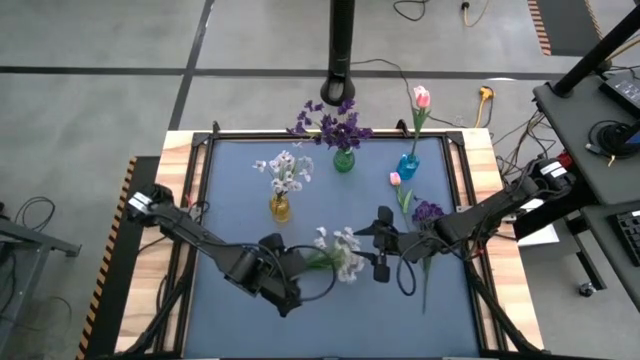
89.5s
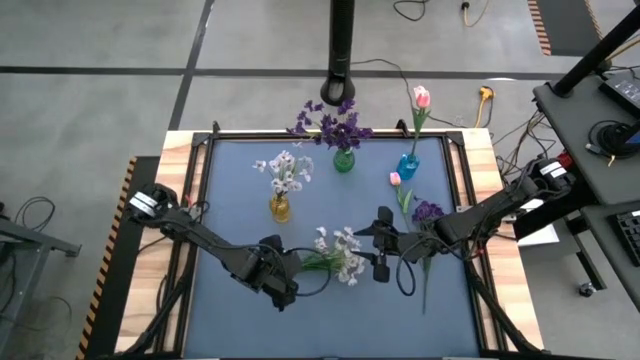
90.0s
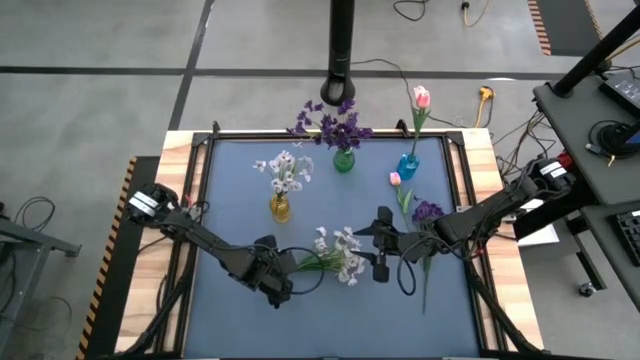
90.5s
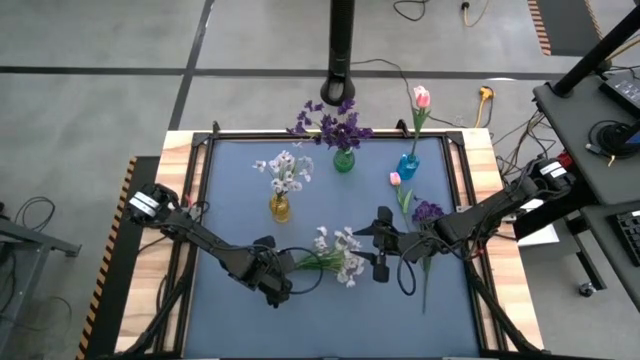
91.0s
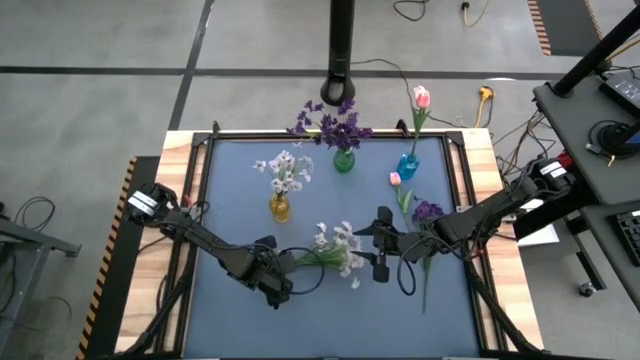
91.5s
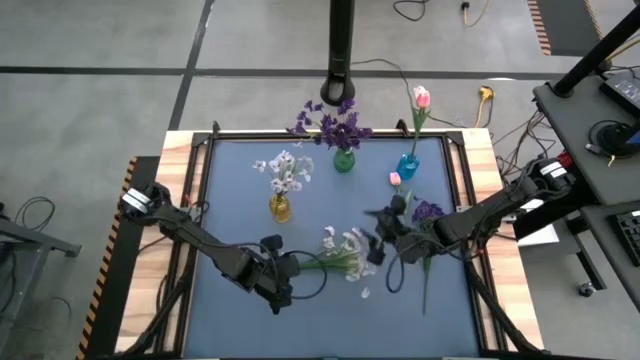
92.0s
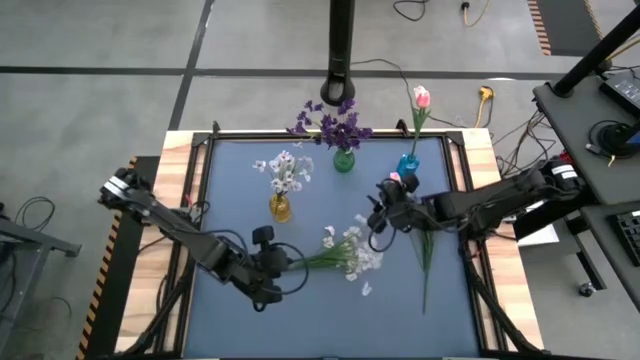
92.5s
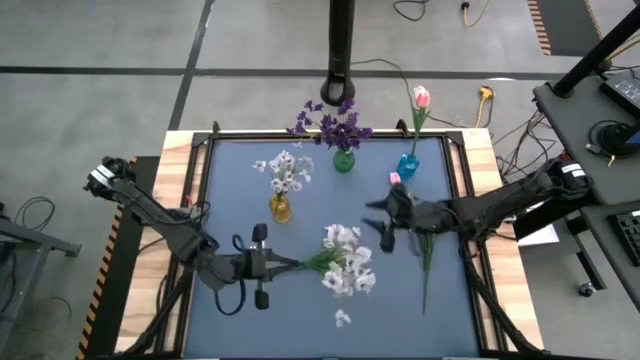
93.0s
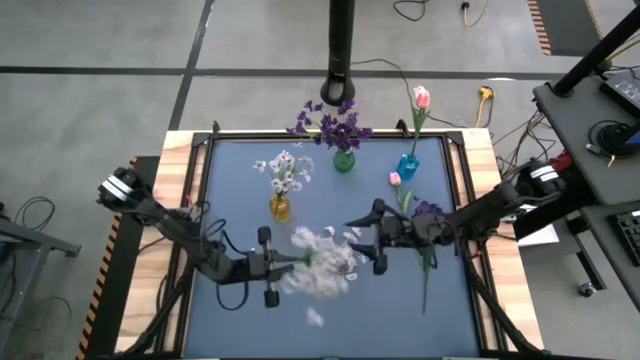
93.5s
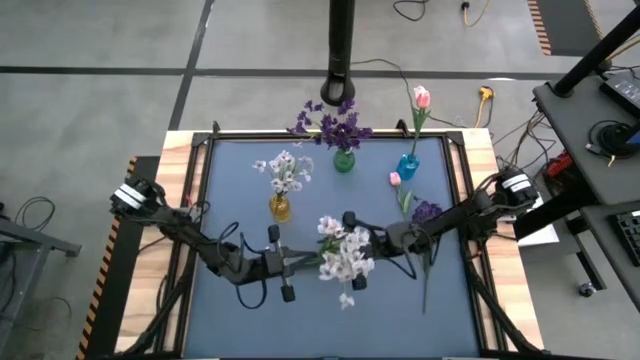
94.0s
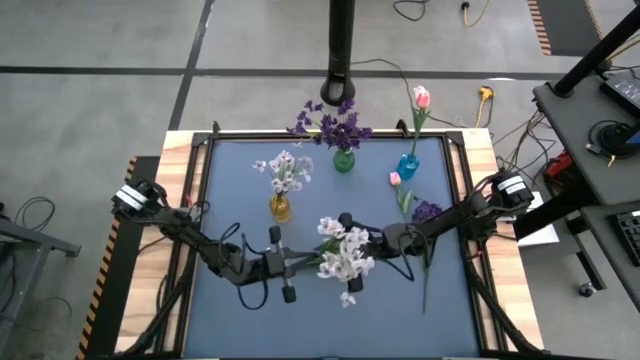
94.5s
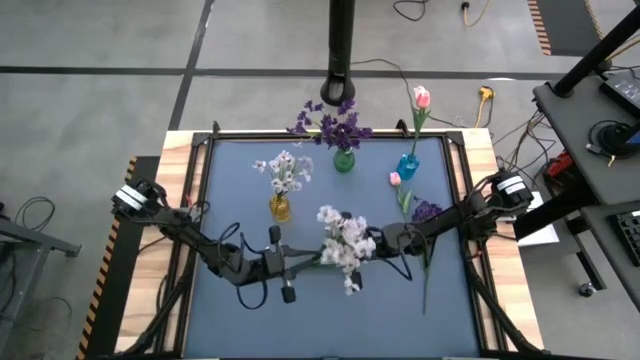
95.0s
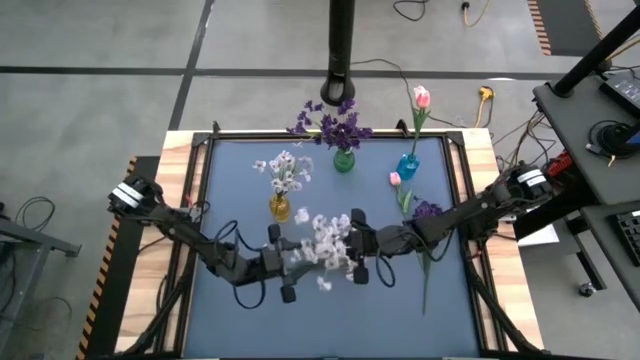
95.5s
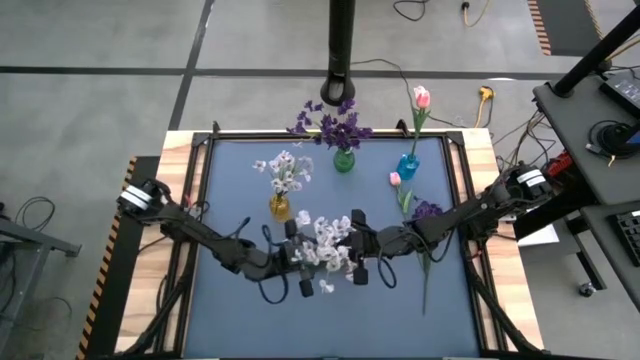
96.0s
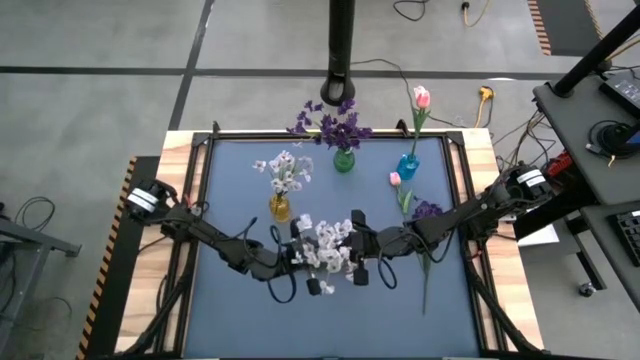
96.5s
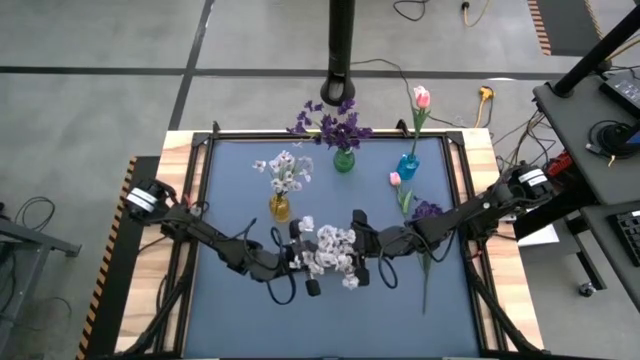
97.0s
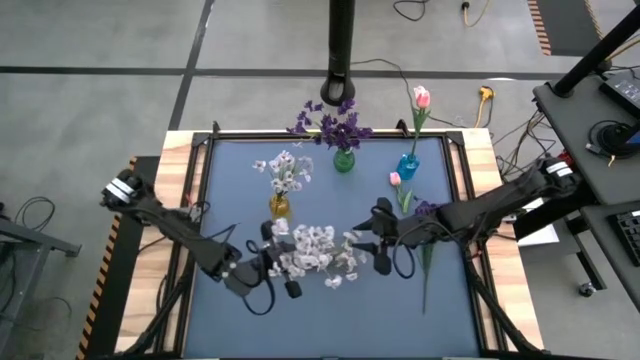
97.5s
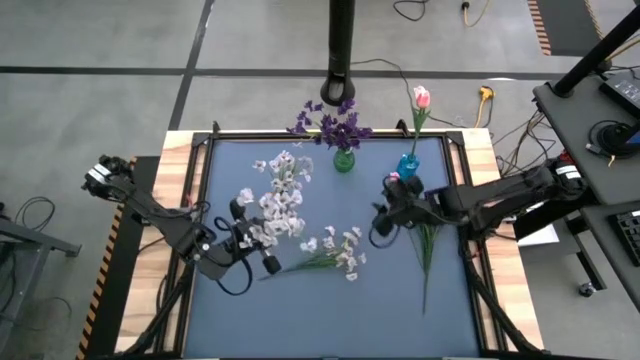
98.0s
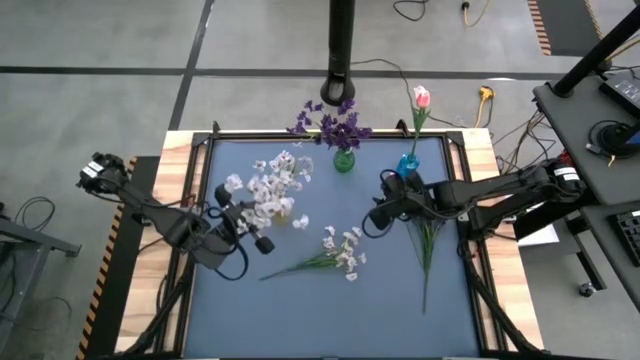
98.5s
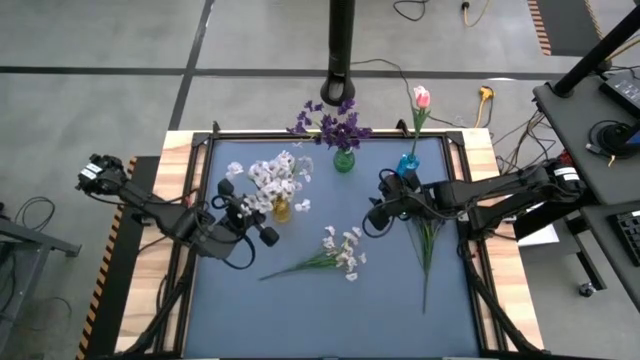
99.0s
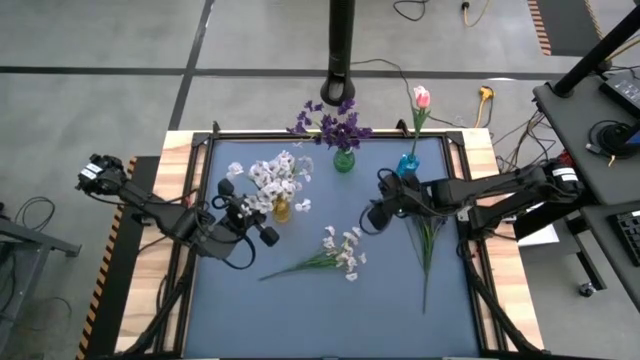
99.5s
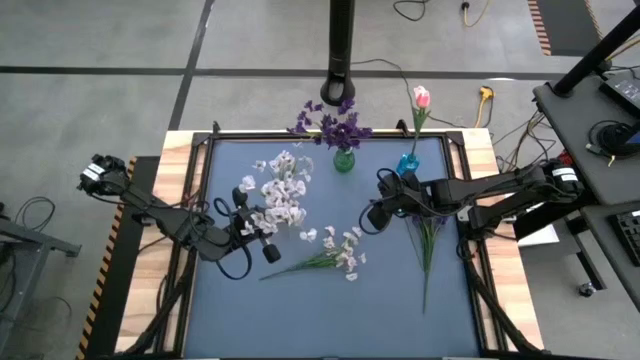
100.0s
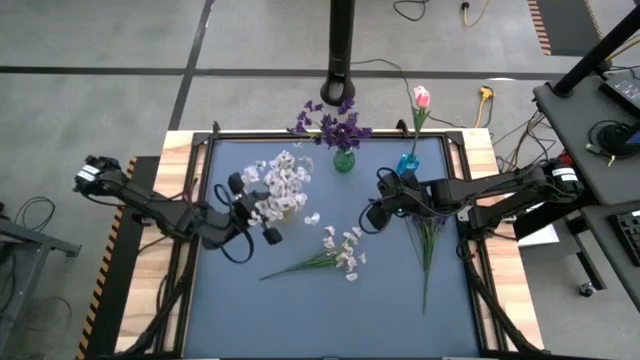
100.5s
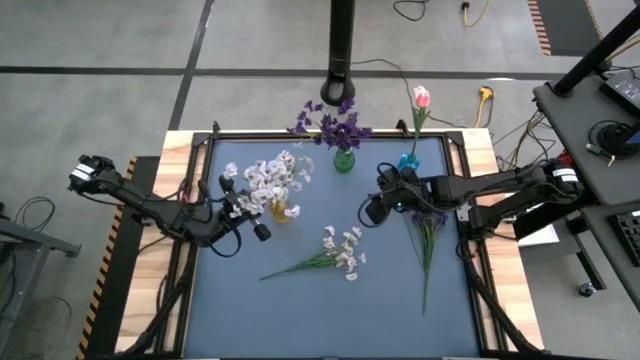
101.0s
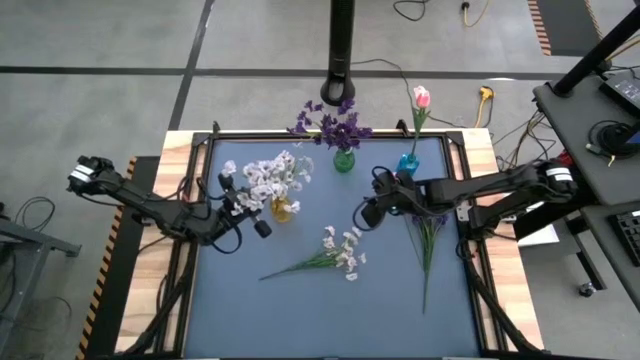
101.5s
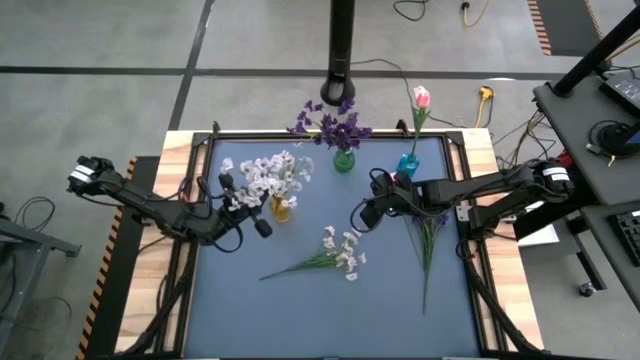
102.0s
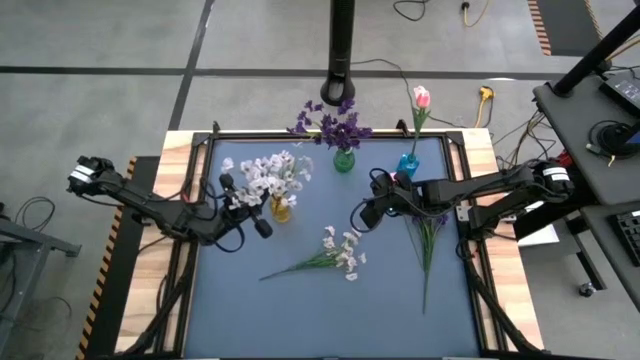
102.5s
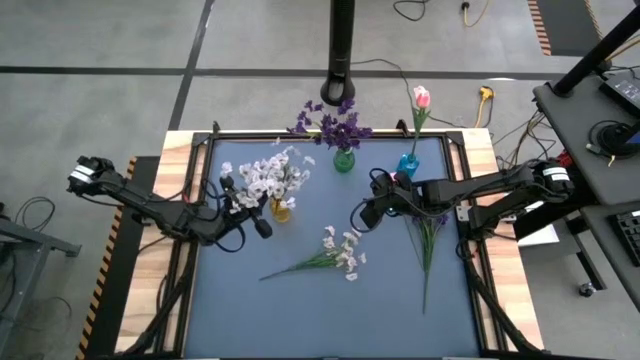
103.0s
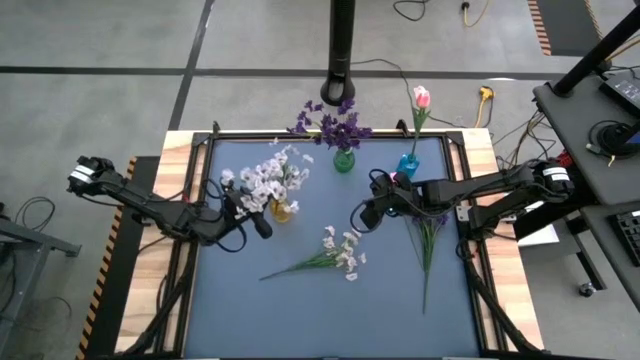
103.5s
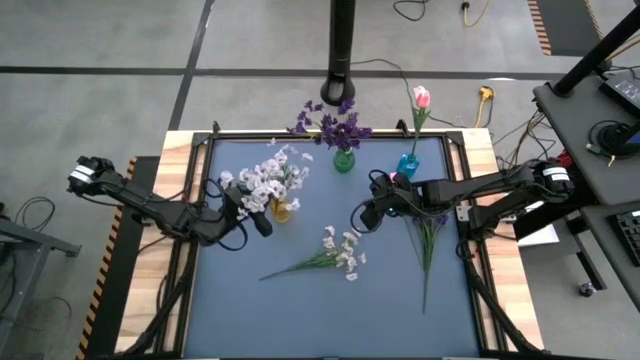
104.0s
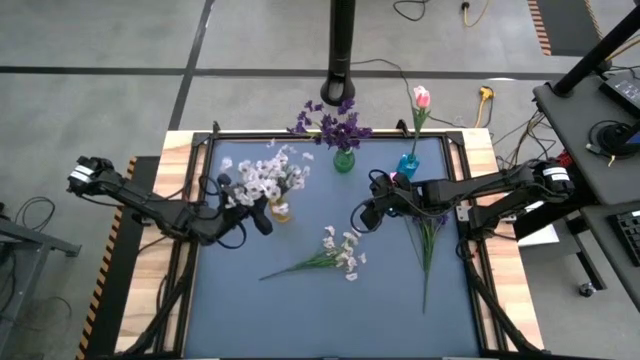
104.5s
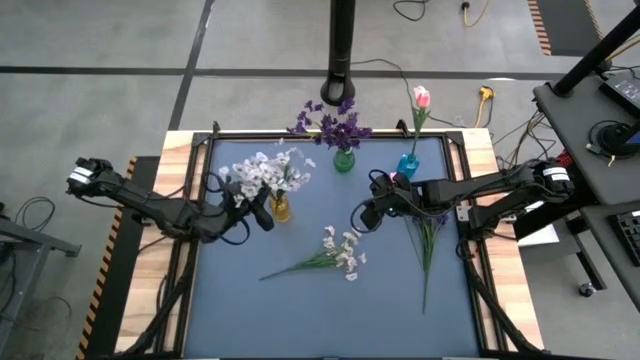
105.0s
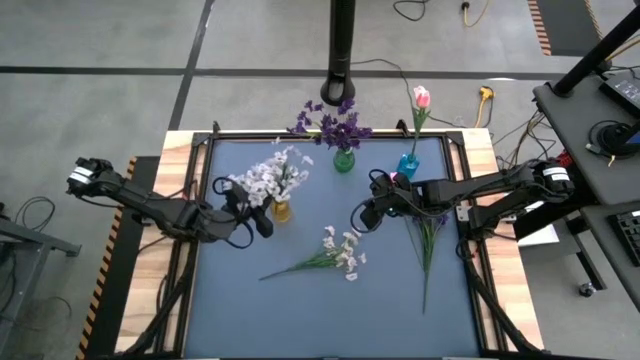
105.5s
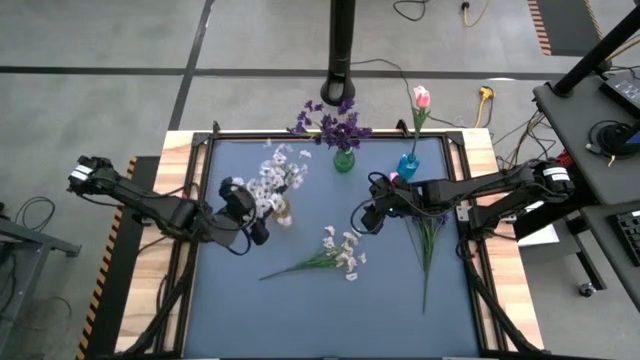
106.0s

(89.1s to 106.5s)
Task: Sort flowers into vase by color
Put the bottom white flowers into the yellow vase

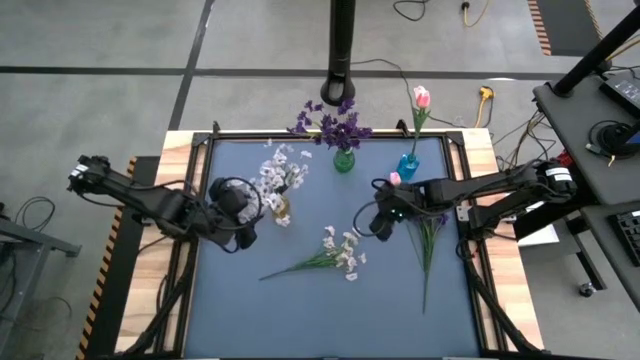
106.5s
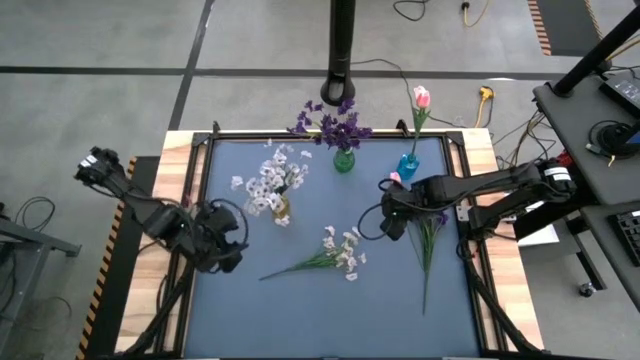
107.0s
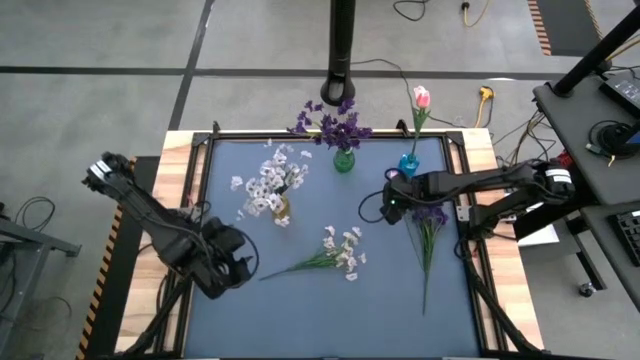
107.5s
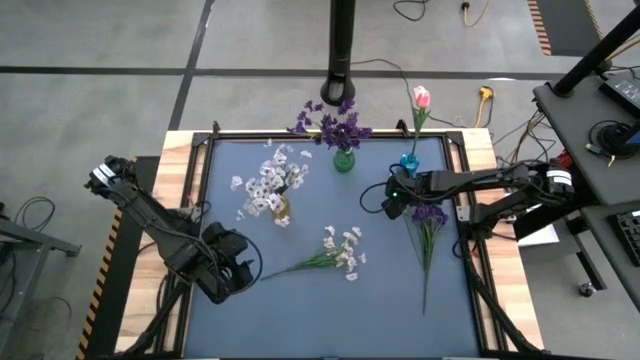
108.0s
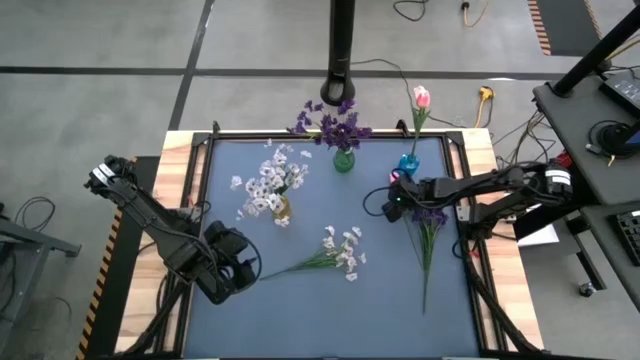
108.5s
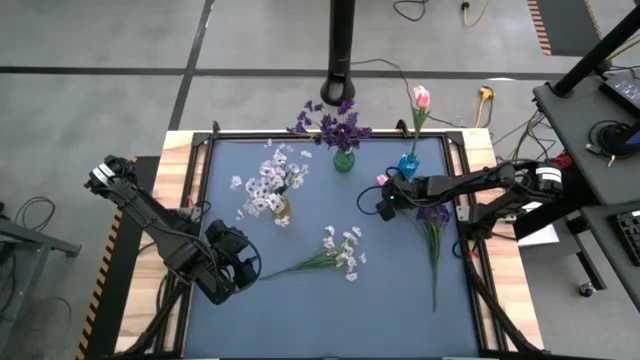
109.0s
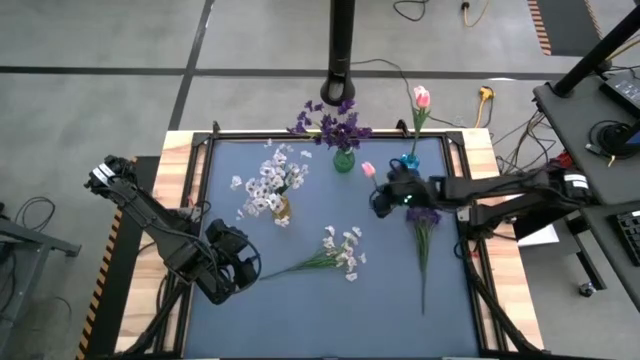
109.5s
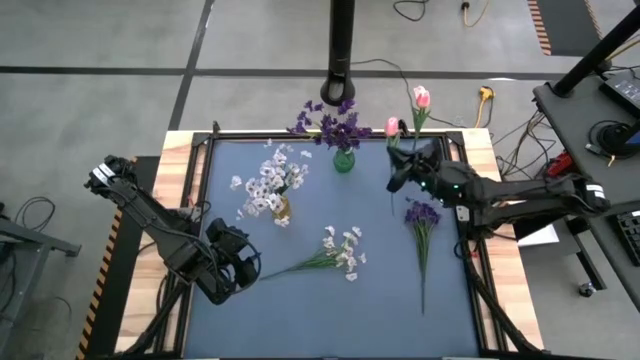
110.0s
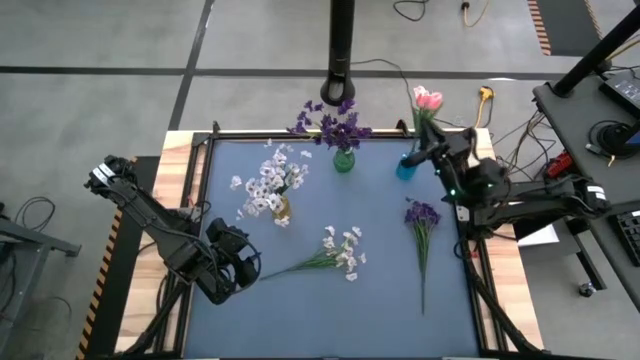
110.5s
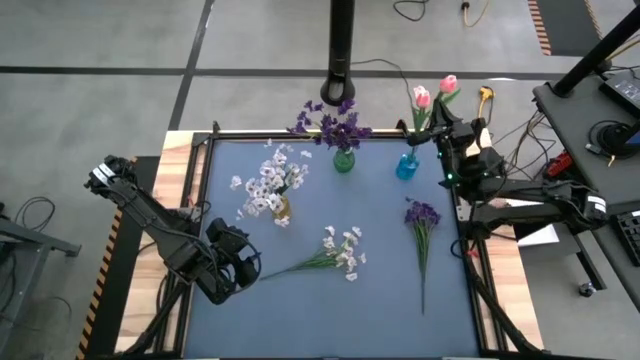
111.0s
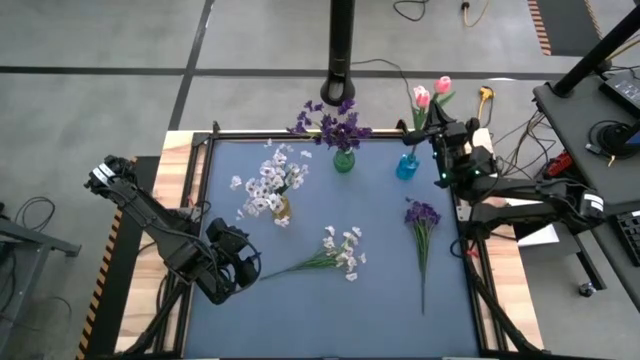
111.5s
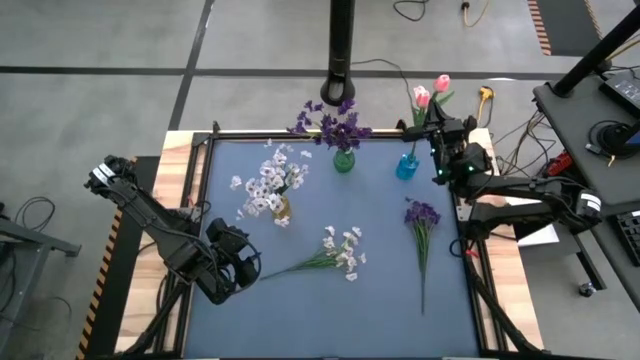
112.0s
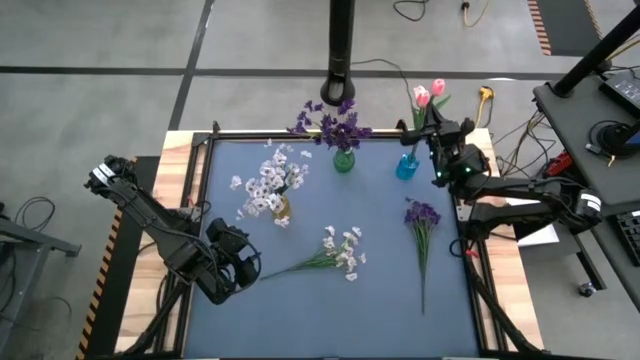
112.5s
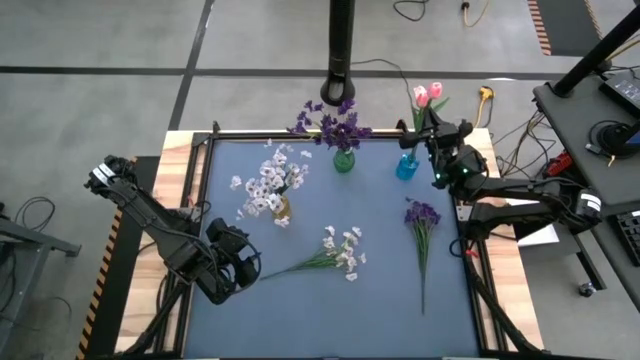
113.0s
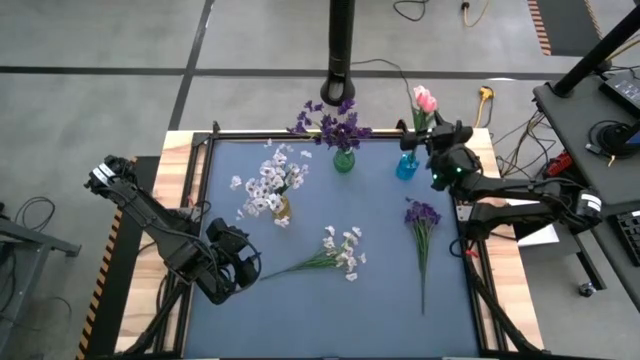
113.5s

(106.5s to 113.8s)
Put the pink flower into the blue vase
